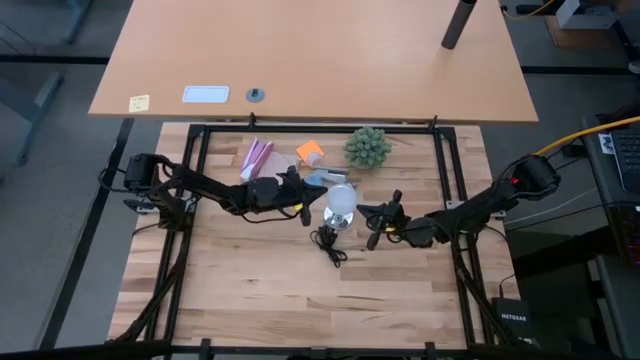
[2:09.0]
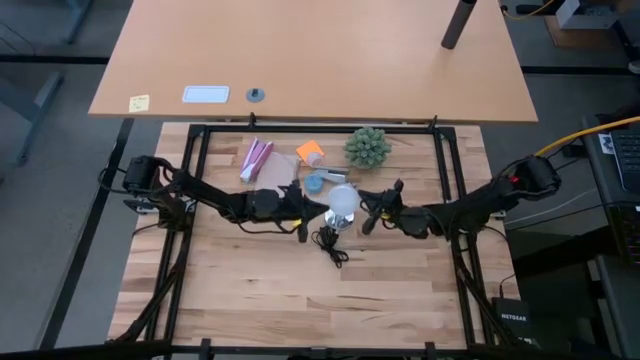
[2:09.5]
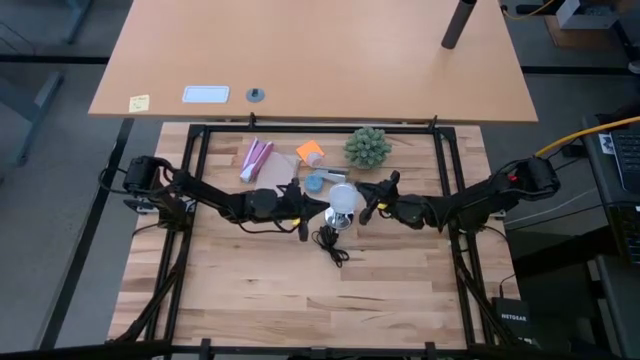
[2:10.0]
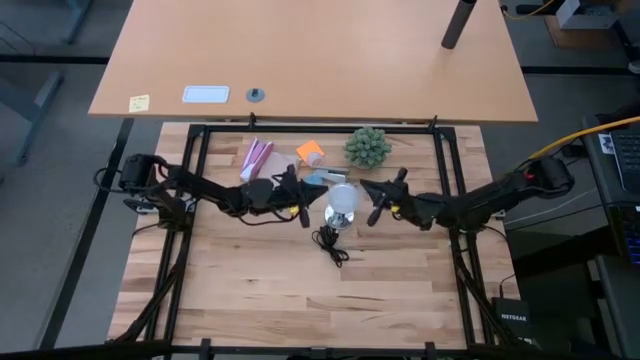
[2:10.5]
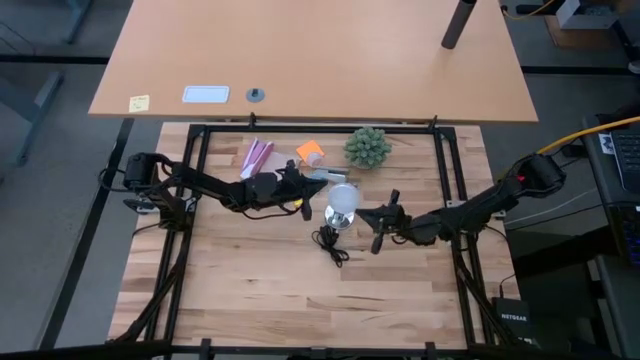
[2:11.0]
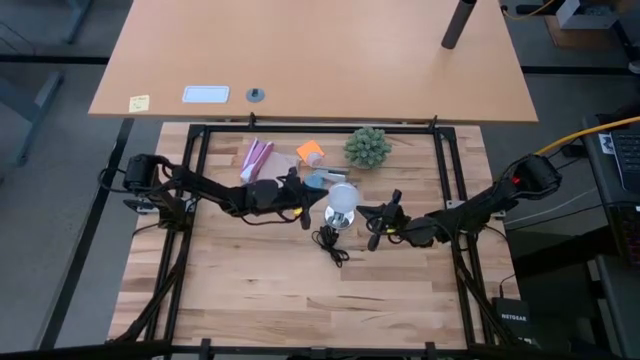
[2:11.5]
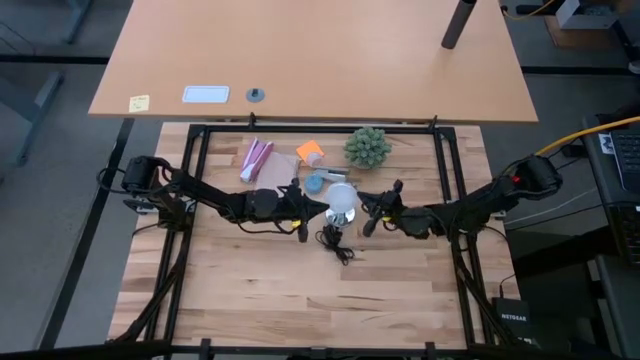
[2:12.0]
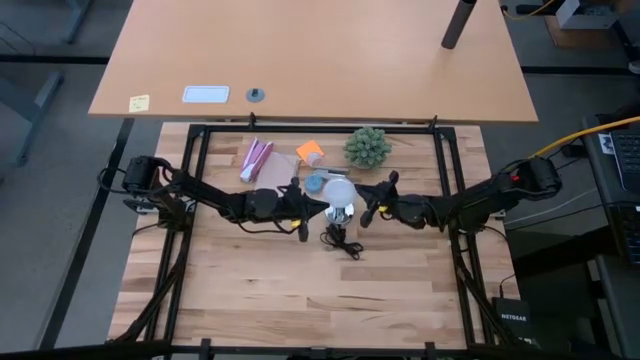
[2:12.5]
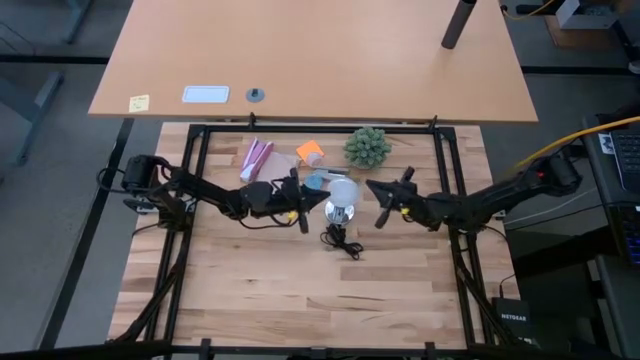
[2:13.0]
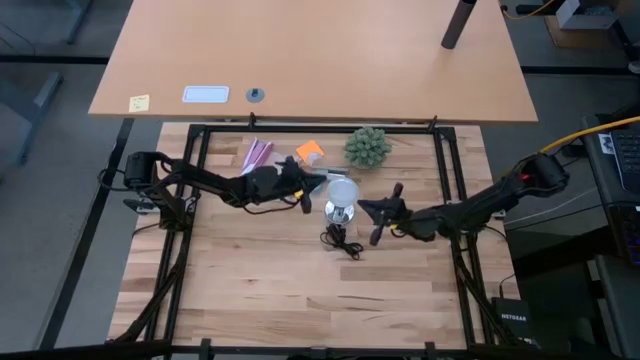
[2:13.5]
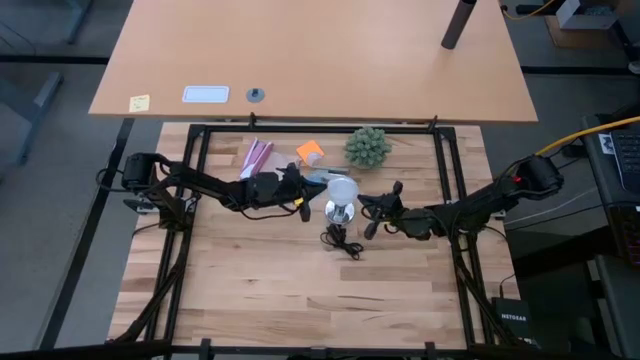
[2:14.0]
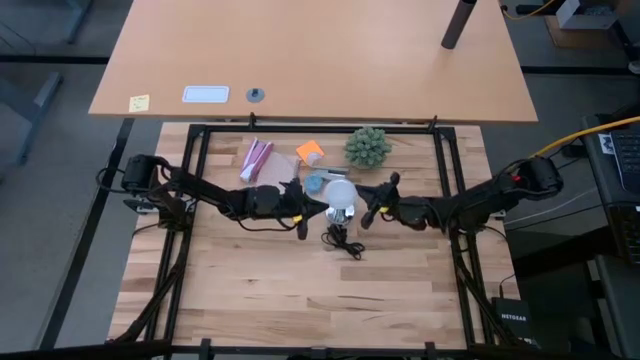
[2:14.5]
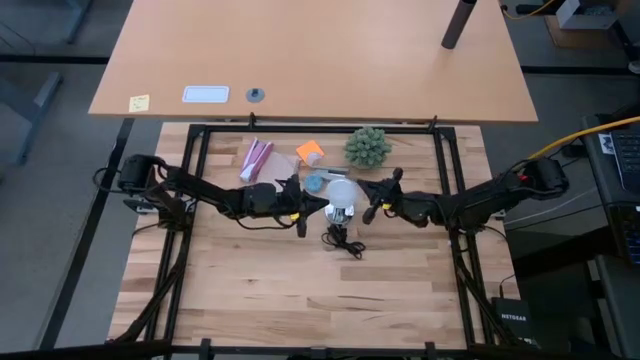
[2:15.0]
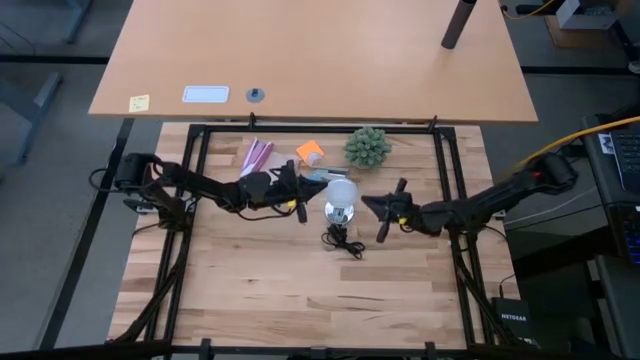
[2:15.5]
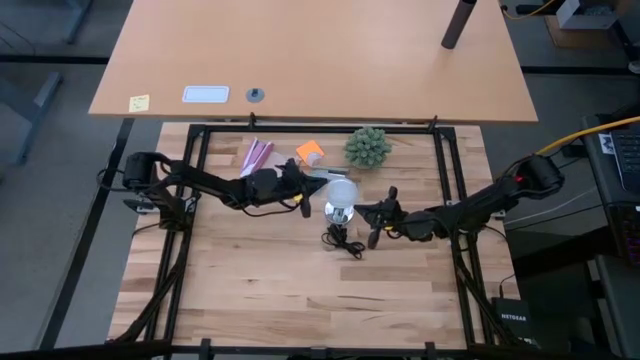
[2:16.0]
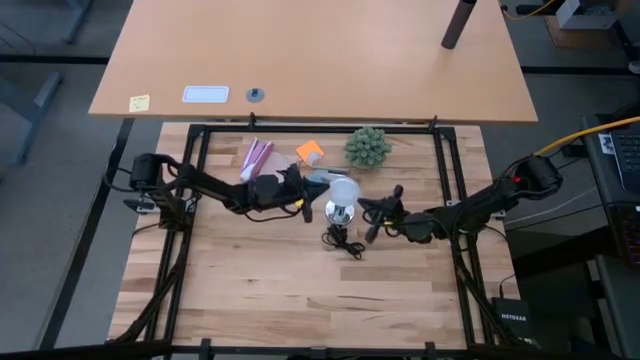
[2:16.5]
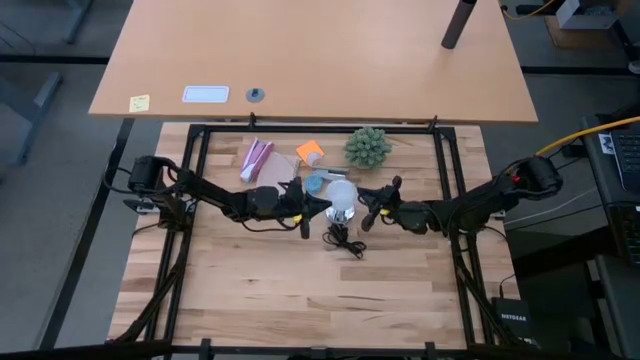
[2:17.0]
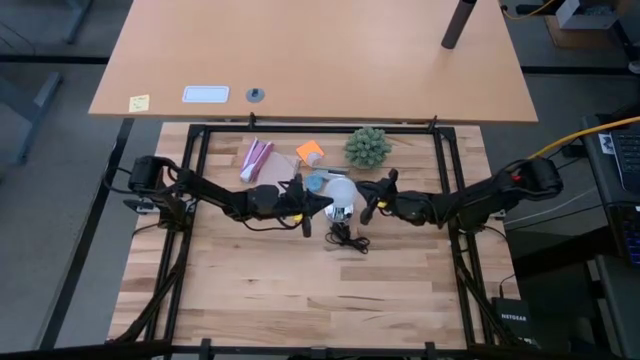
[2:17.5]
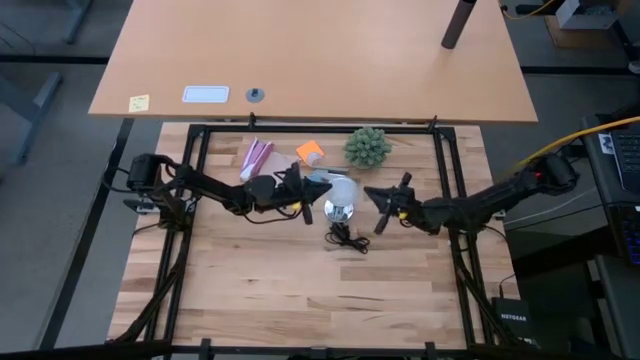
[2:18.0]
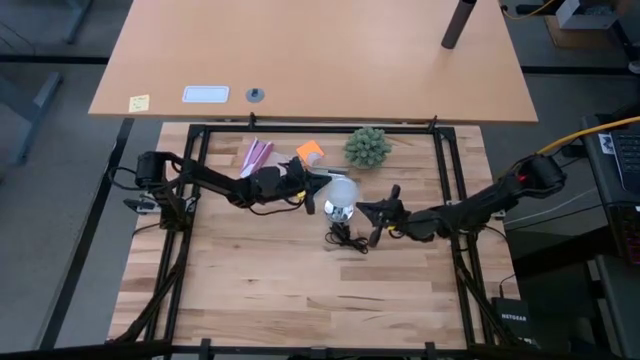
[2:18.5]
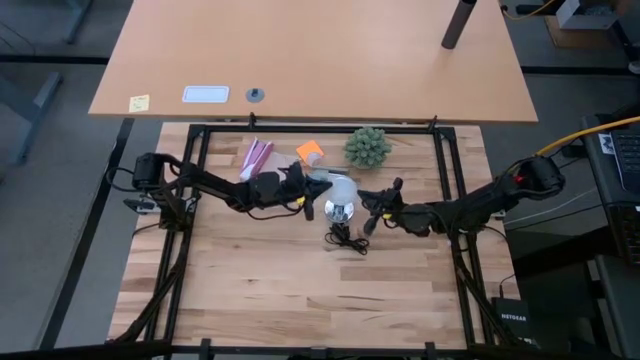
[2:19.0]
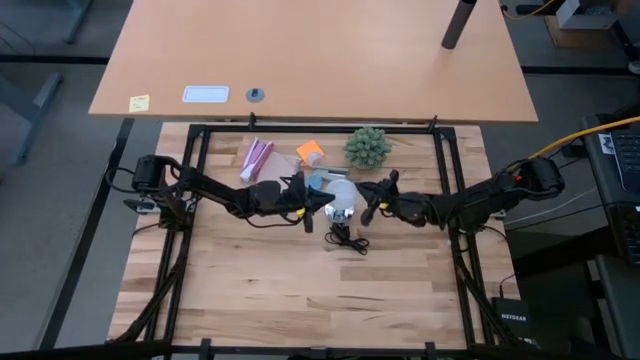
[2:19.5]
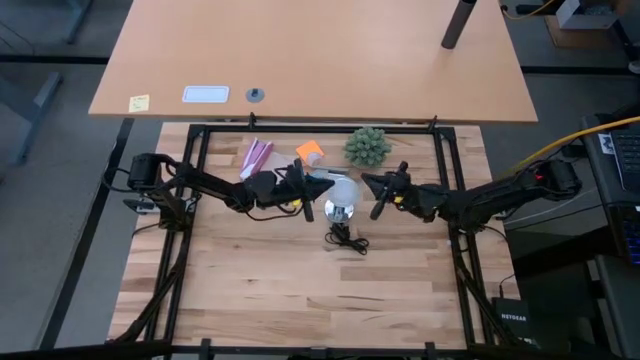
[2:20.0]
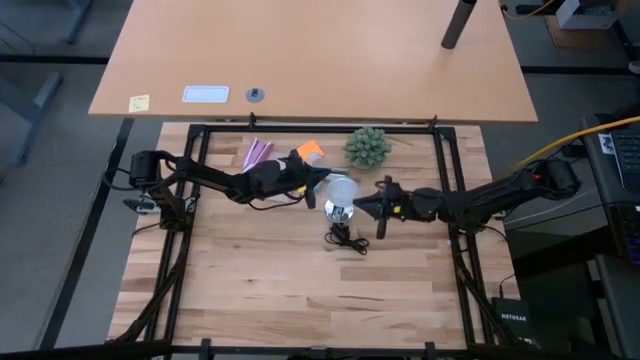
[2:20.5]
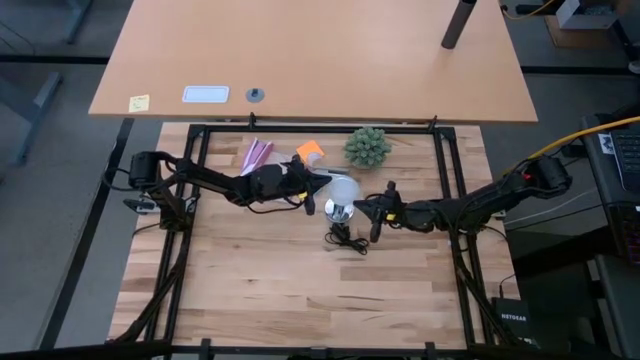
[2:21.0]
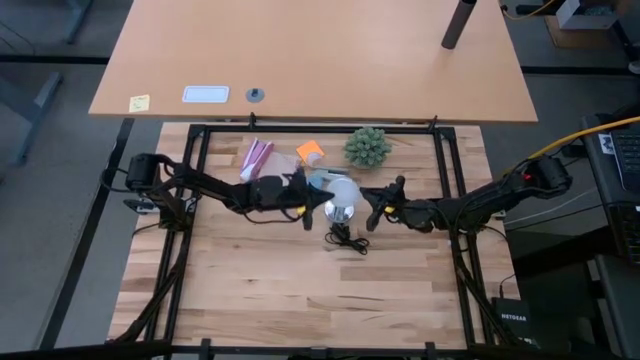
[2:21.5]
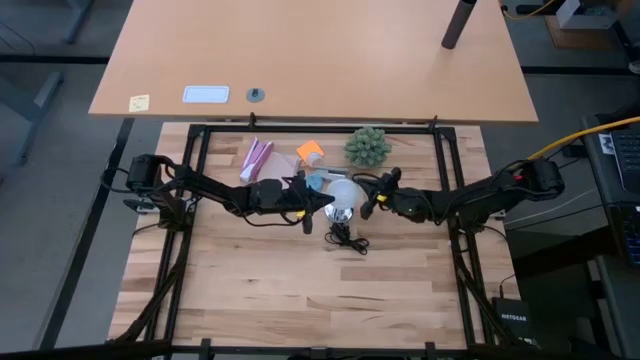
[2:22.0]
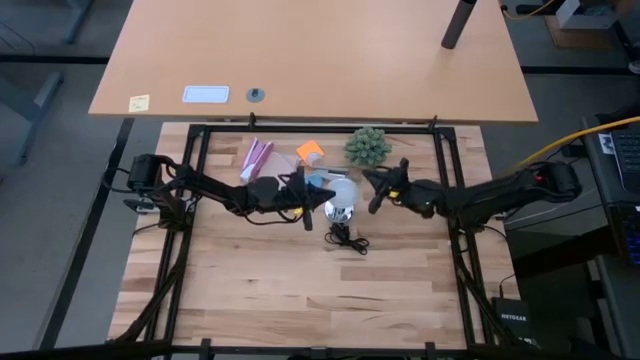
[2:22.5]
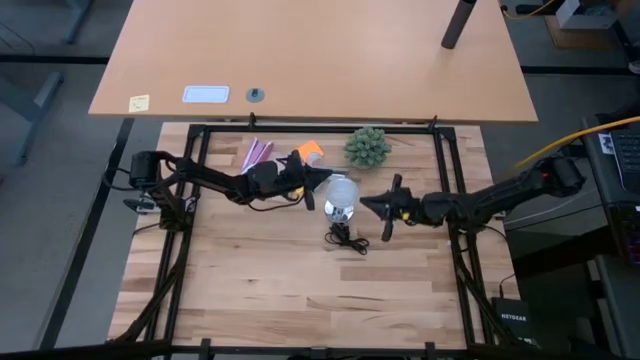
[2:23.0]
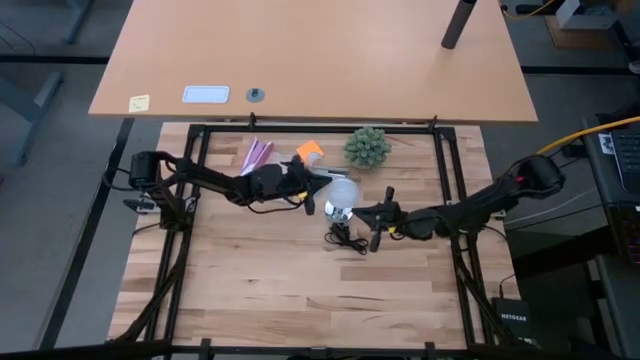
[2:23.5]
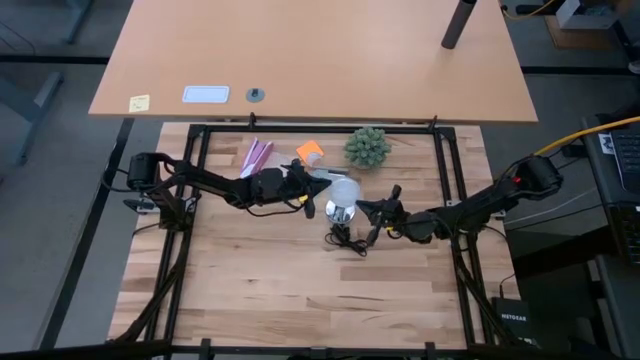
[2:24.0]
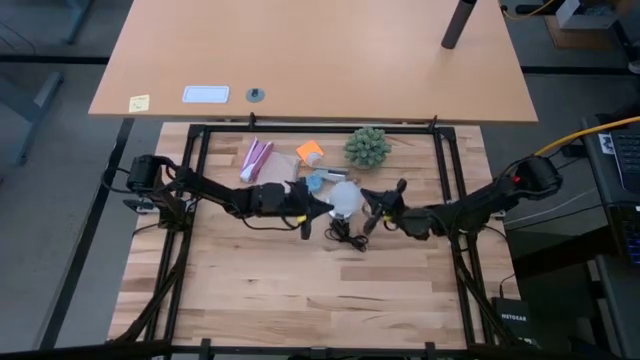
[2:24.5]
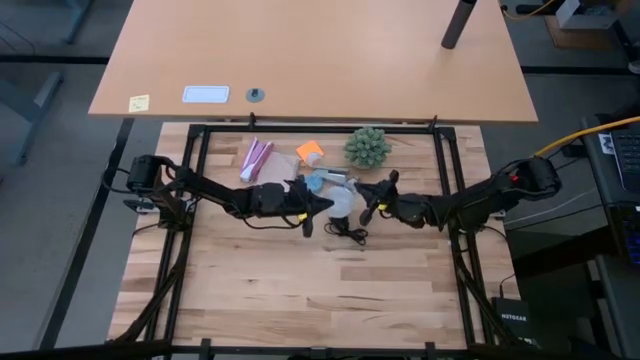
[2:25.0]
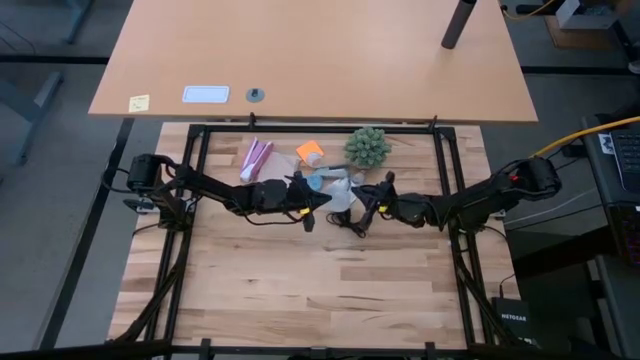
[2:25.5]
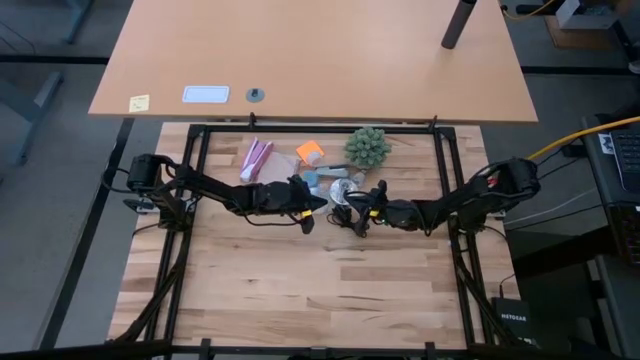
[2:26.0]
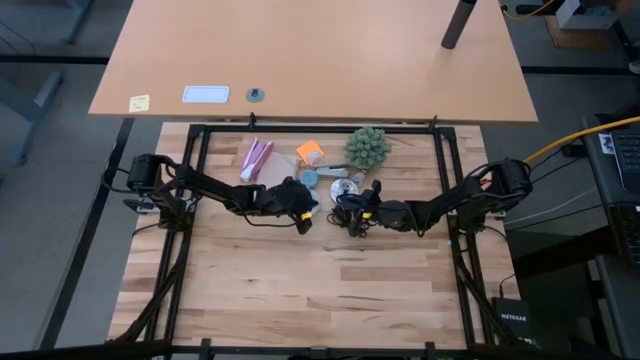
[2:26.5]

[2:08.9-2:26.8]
Task: Screw lightbulb
Remove the lightbulb from the silver lamp socket

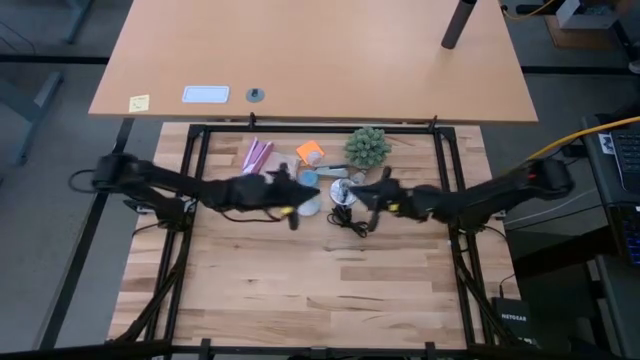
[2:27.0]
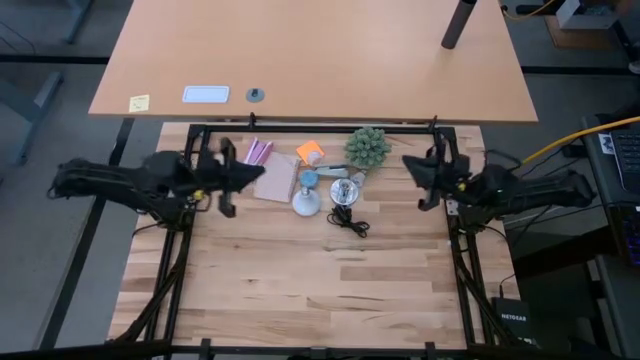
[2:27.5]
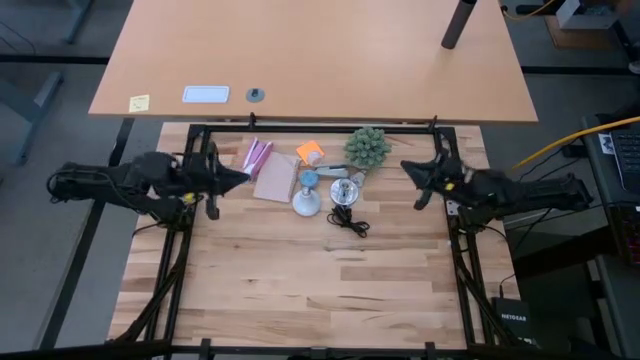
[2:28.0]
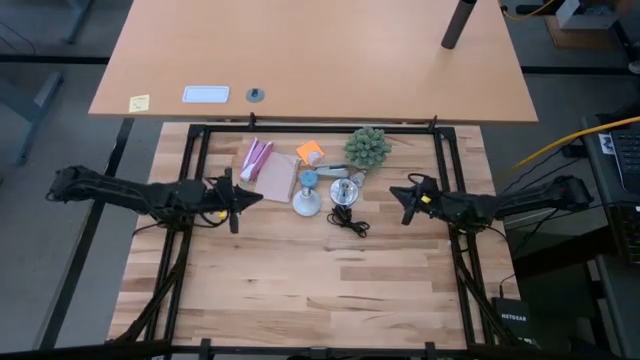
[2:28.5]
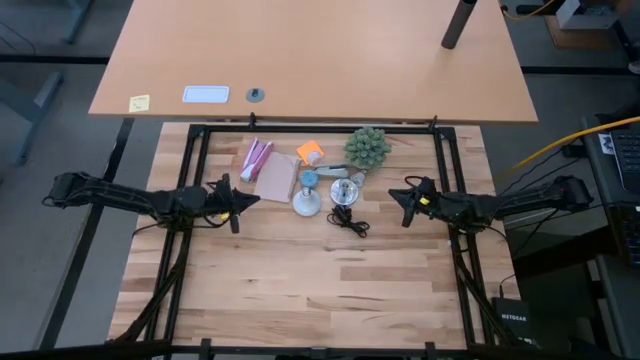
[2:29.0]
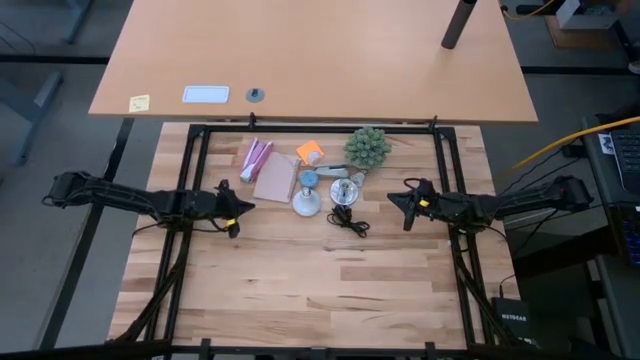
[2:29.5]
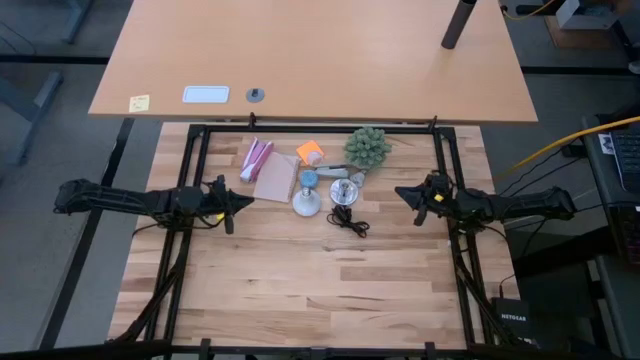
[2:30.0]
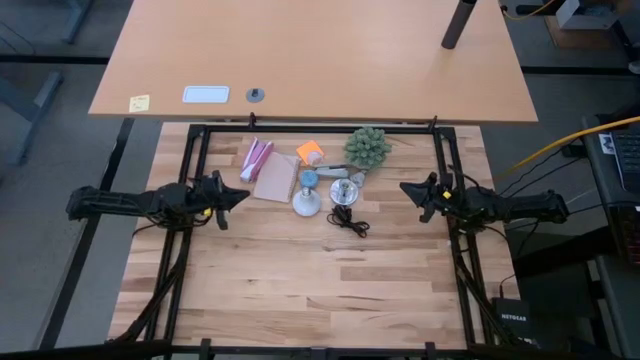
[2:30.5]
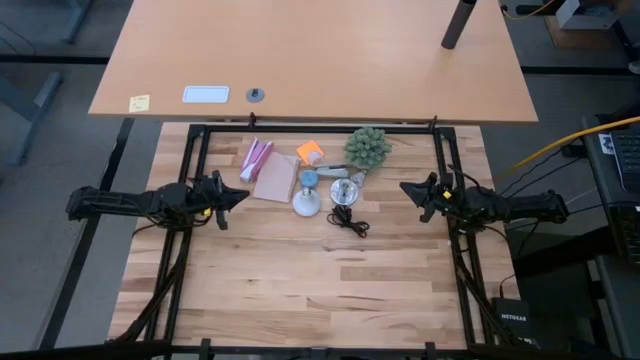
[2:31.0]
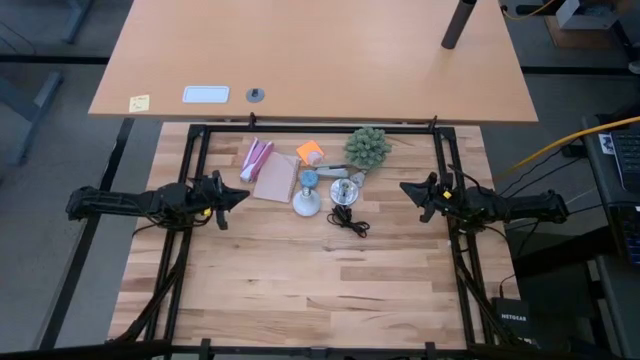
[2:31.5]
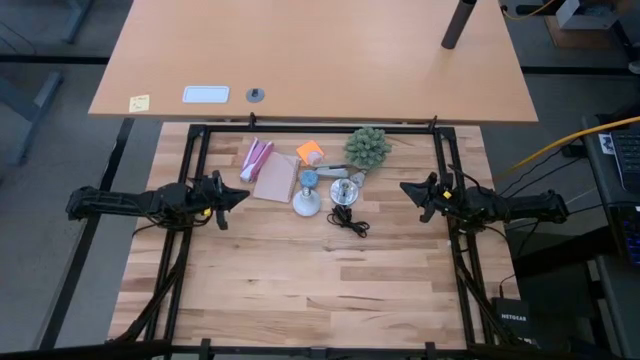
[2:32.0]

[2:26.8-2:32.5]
Return to Home Position
